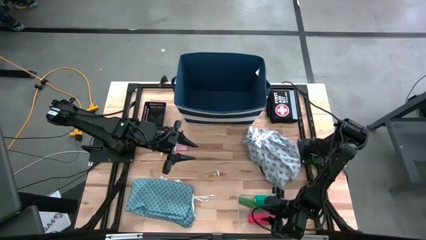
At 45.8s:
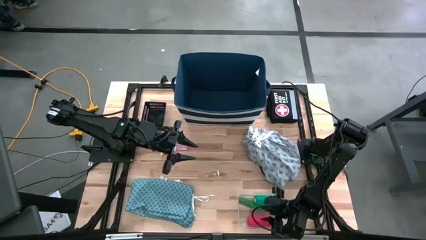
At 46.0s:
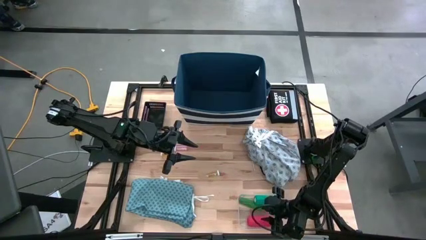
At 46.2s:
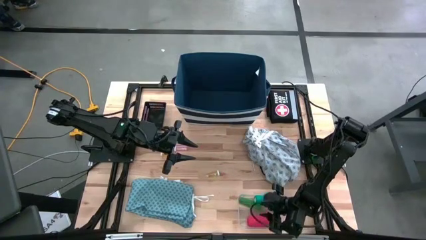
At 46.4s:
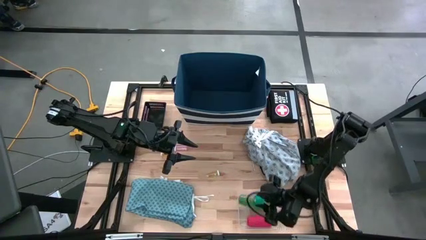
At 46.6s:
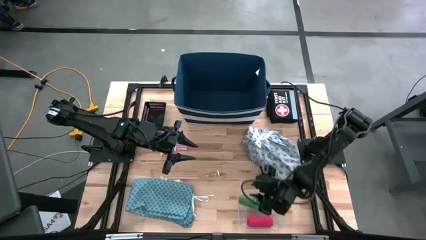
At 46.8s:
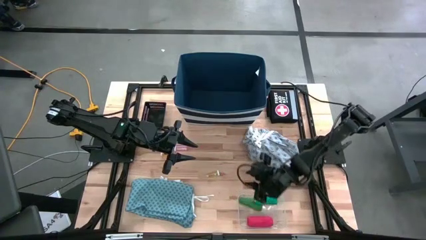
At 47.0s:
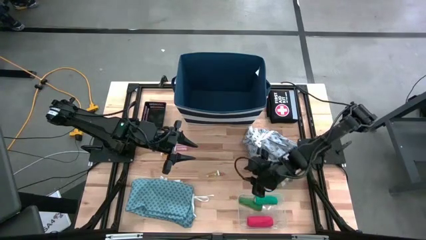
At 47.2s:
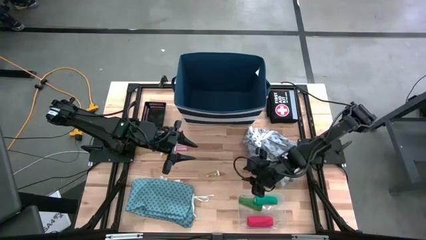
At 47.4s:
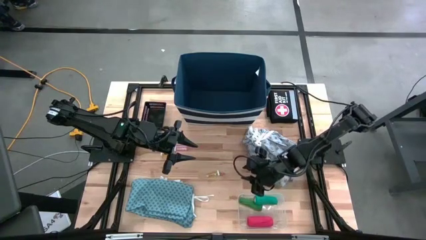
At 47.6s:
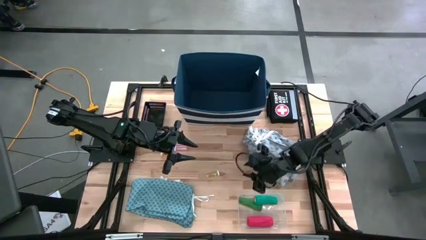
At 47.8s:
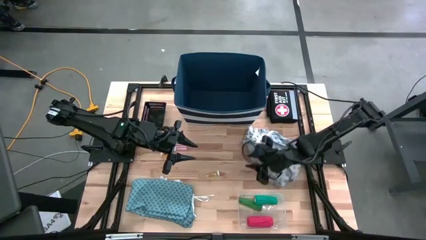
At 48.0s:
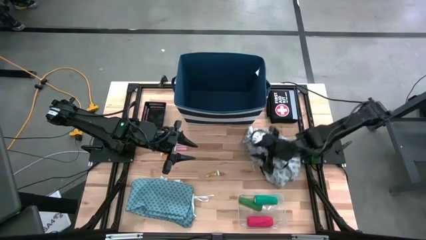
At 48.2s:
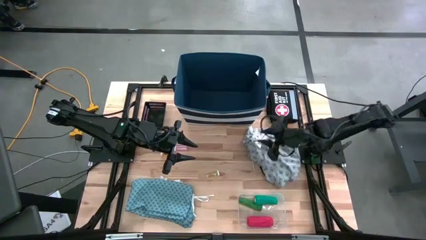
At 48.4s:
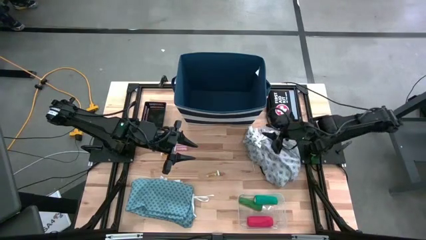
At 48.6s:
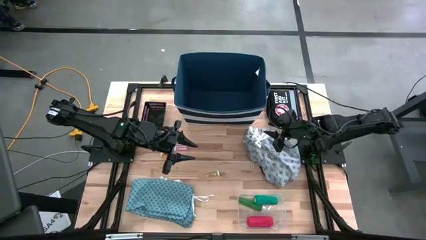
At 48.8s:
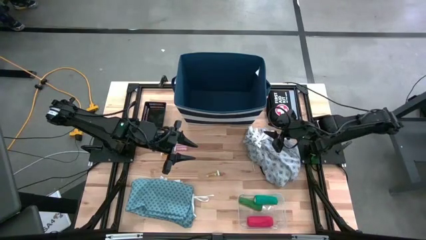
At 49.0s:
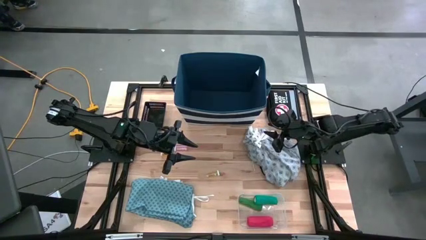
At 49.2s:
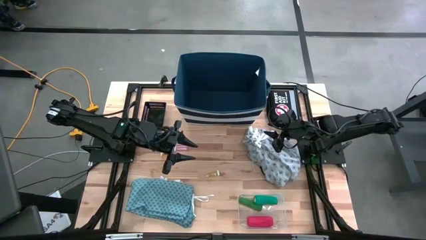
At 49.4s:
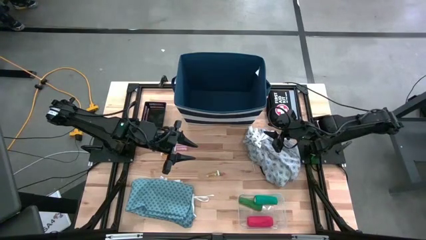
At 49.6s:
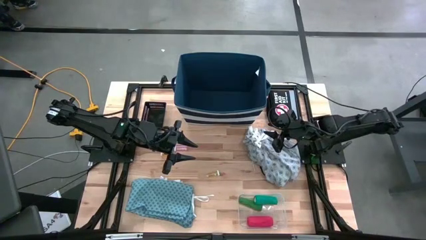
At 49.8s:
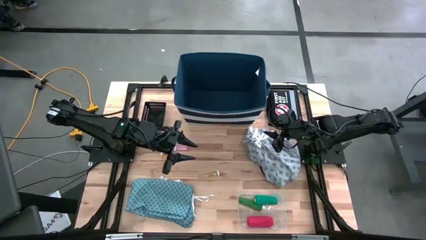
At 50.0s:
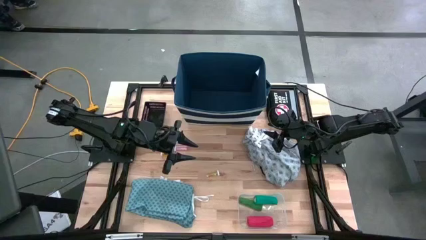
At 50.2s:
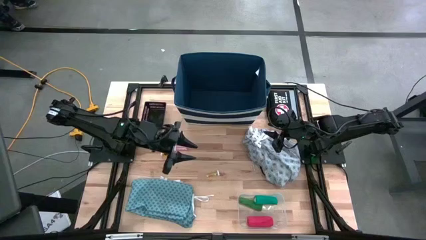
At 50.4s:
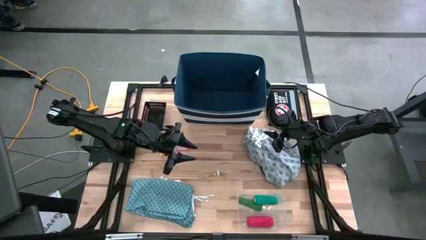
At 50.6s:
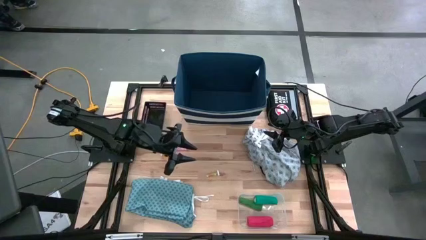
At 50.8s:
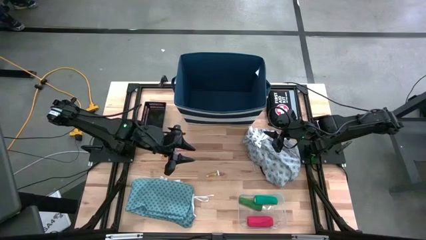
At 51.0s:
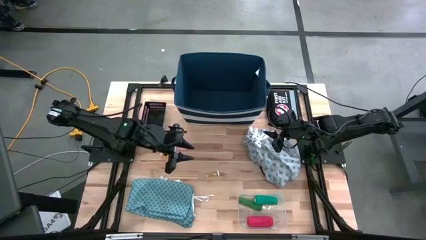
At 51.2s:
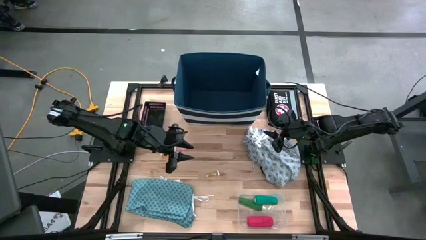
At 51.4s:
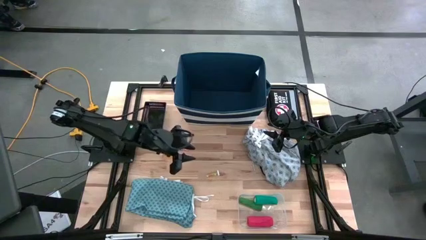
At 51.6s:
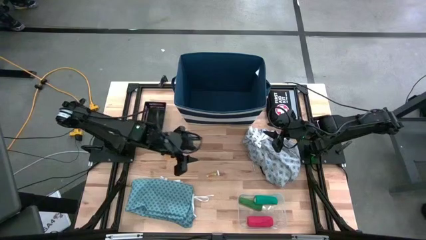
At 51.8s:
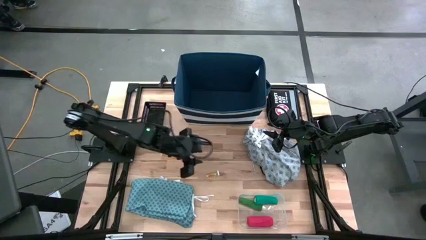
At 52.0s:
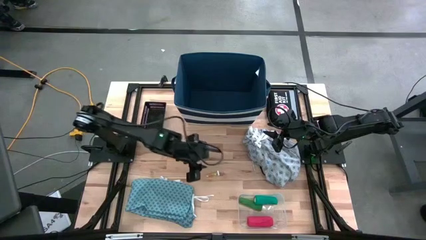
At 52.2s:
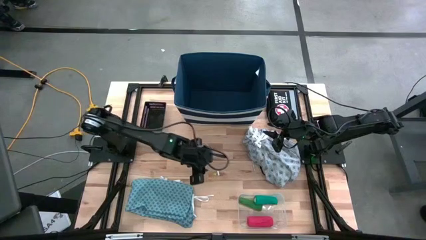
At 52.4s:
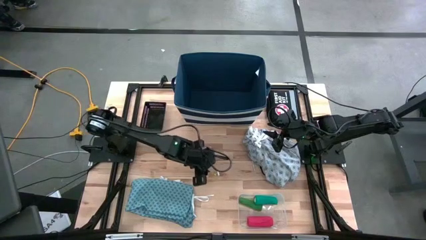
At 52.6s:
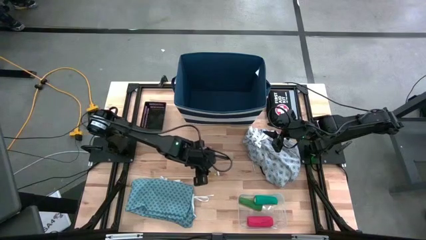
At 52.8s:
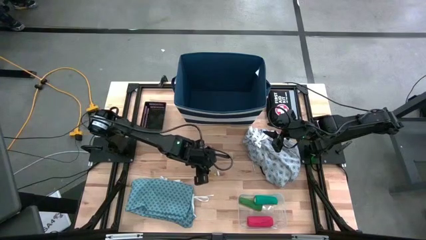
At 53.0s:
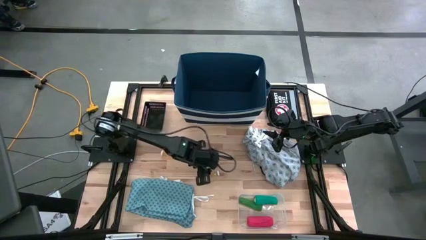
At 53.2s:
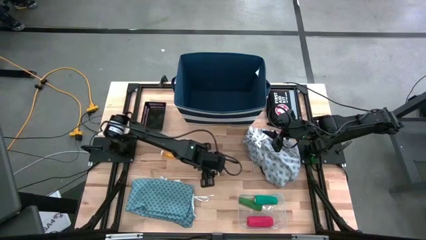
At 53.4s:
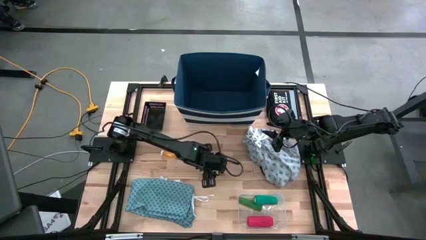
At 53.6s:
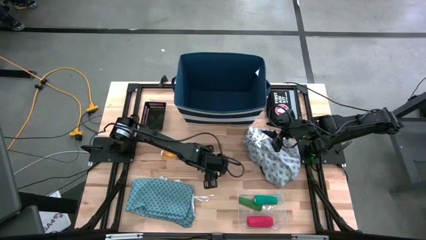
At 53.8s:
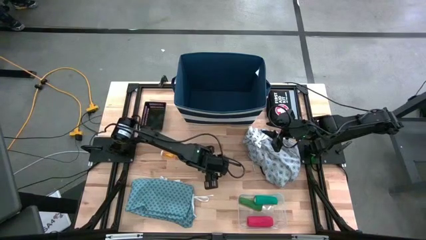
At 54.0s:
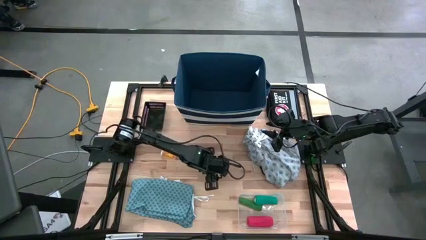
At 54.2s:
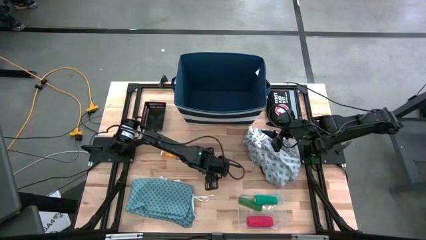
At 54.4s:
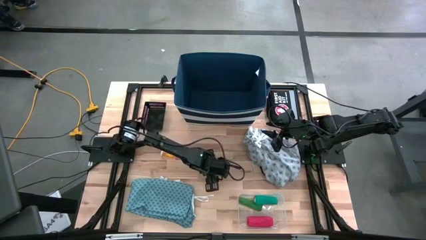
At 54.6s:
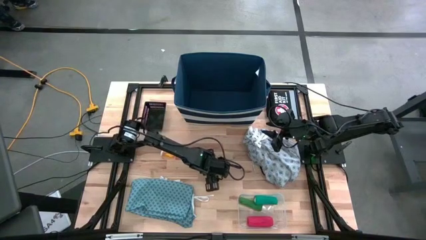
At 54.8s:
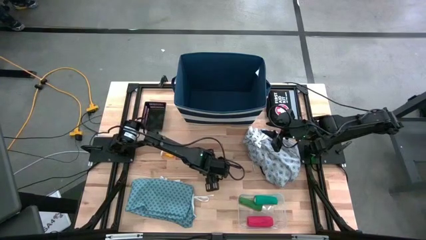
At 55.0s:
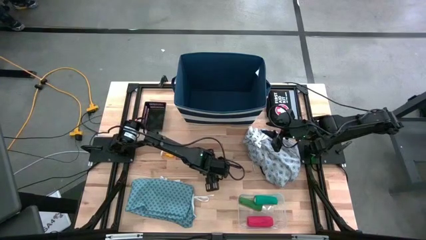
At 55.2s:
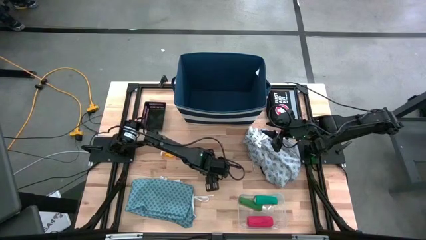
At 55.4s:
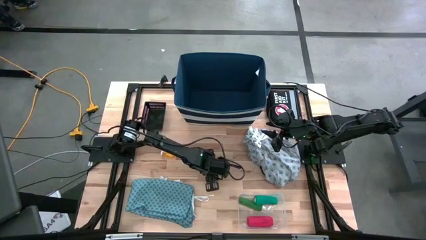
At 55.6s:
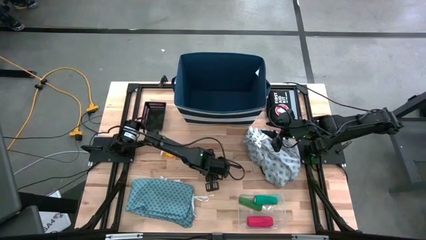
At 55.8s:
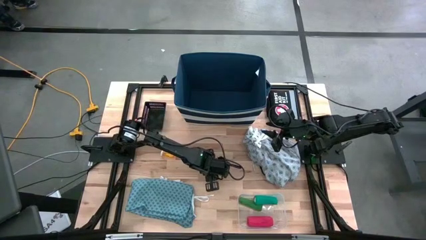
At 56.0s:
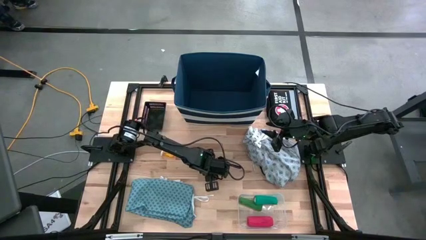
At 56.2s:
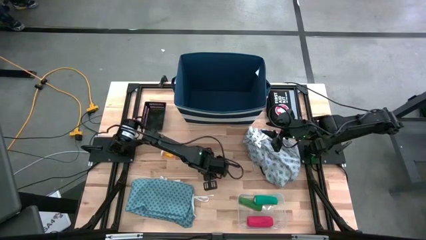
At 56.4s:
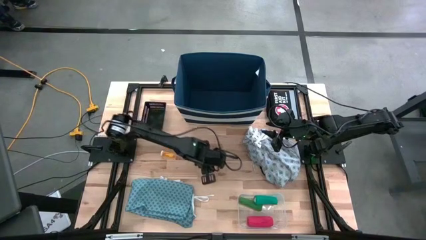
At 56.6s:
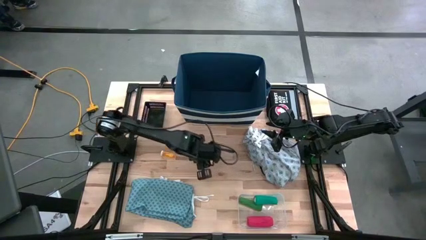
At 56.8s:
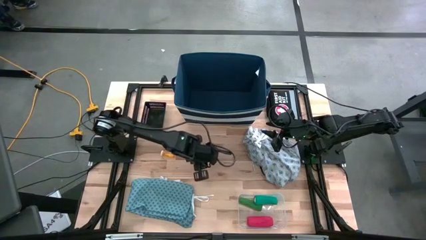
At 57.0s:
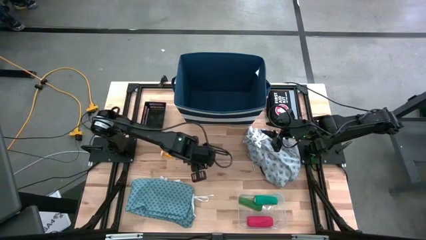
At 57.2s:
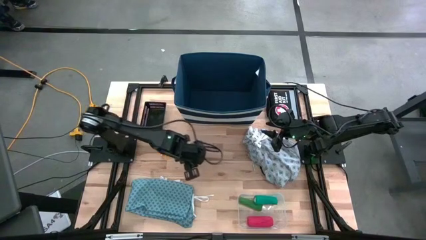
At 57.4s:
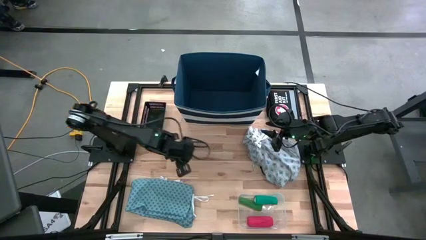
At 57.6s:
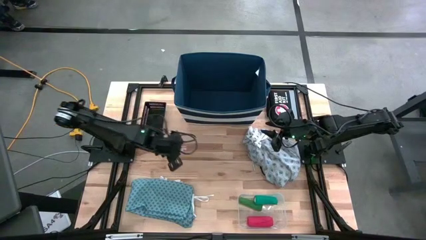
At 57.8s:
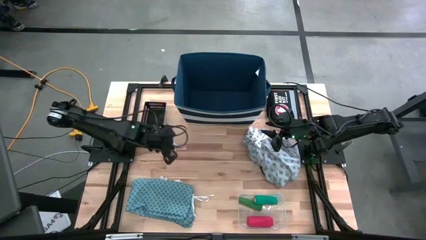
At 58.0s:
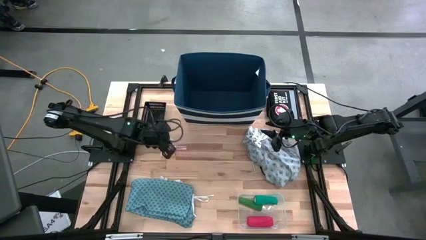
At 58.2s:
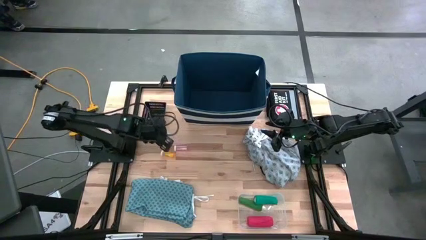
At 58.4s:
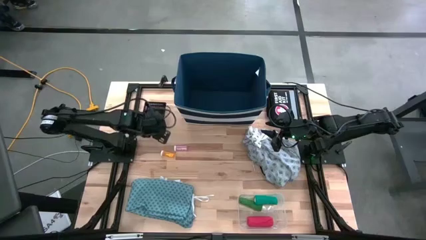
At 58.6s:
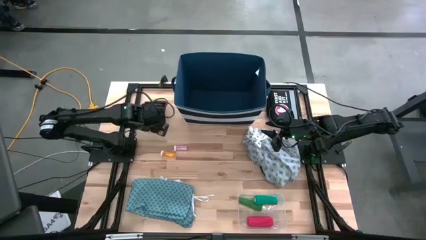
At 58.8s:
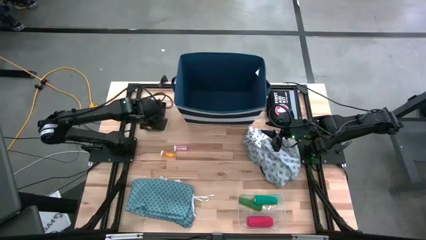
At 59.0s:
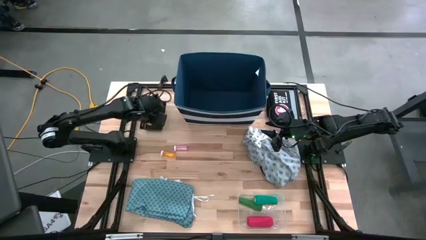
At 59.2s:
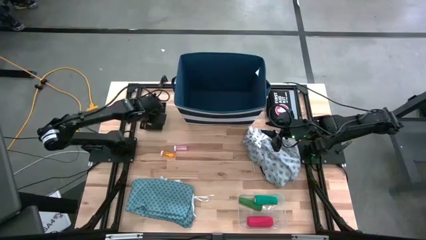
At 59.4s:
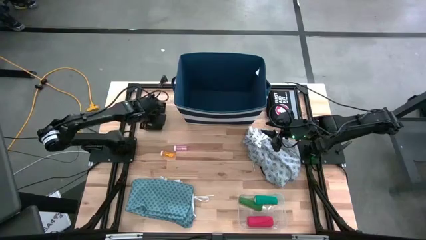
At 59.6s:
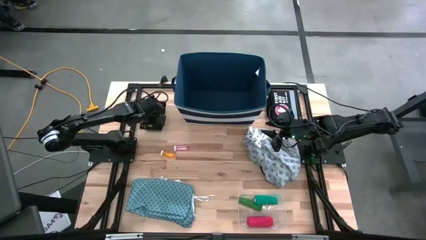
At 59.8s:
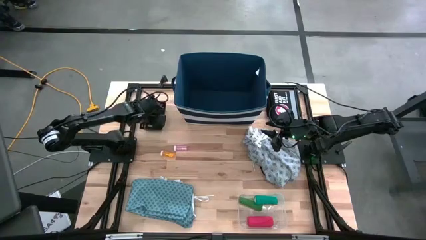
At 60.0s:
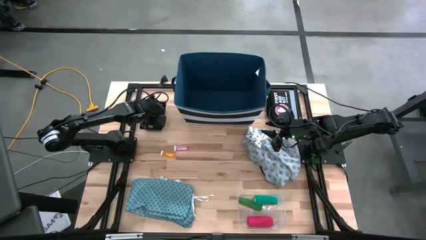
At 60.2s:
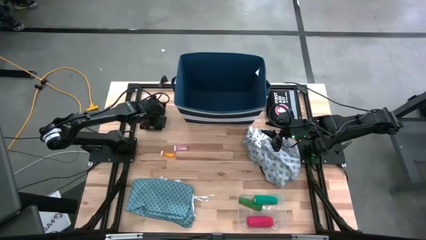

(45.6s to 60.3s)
Task: Pick & Place Medicine items
Put the transparent yellow medicine bottle into the black bin
